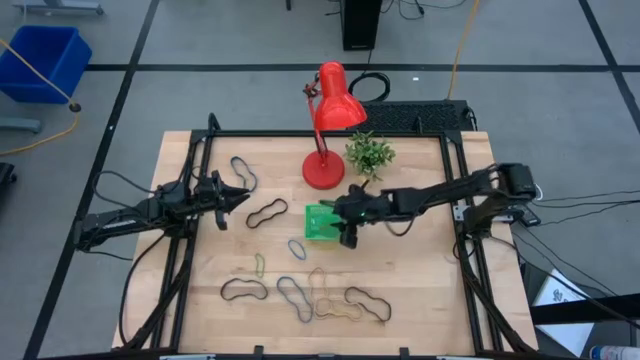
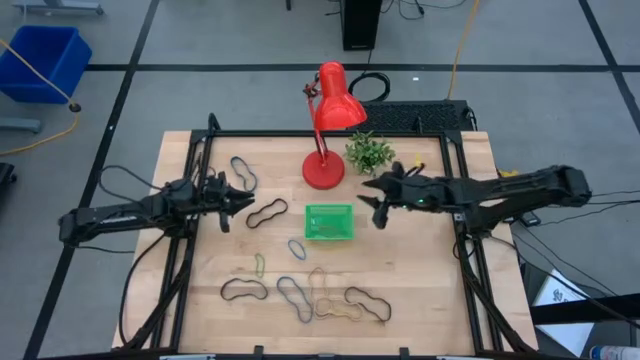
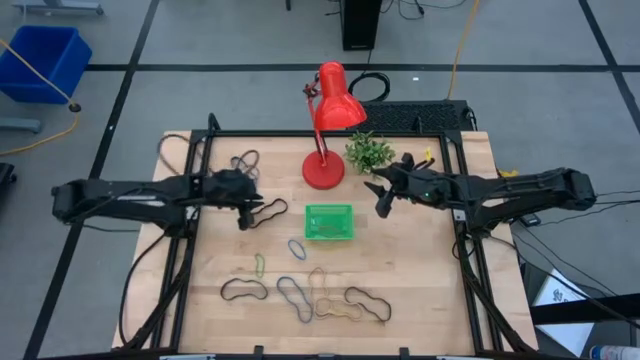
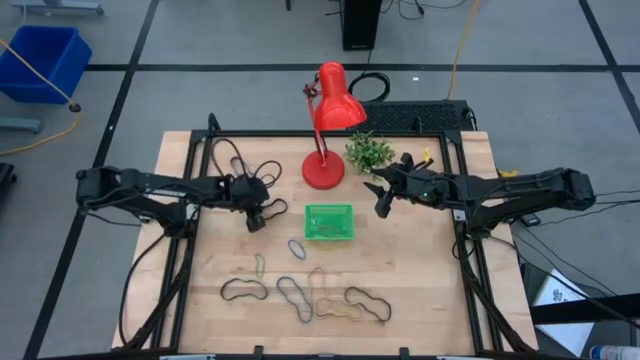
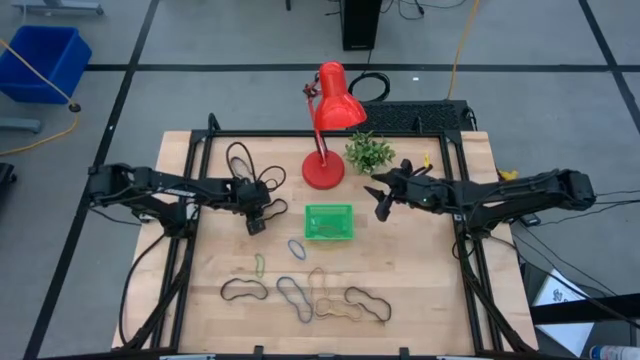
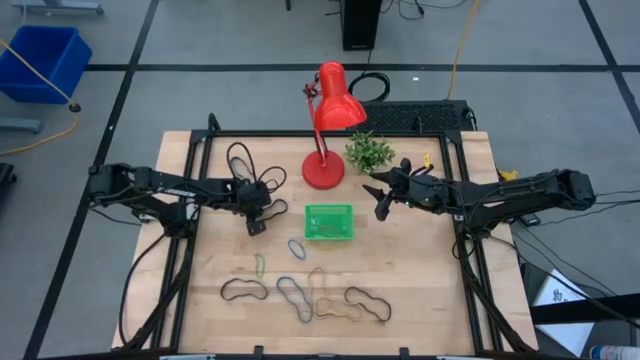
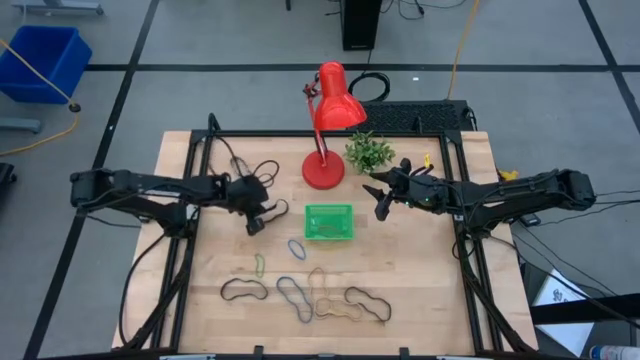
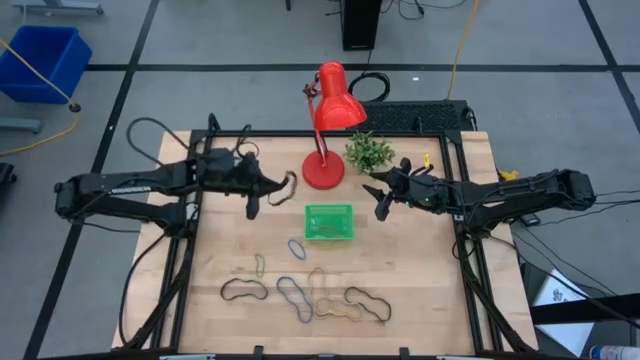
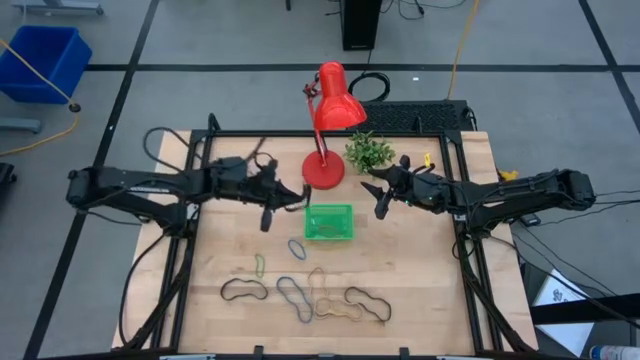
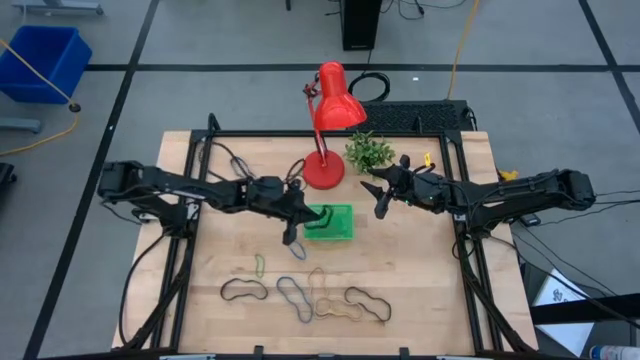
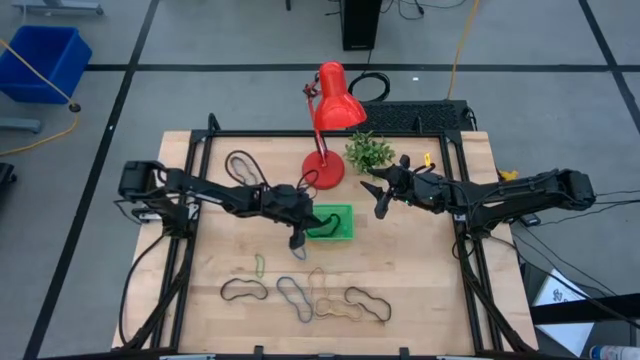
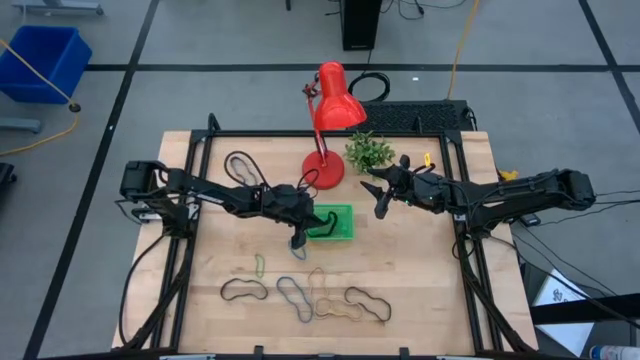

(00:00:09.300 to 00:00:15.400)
Task: Pick and place rubber bands into bin
Put the top left black rubber band into the green bin

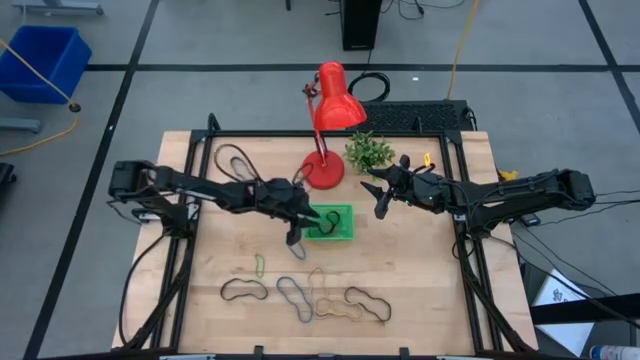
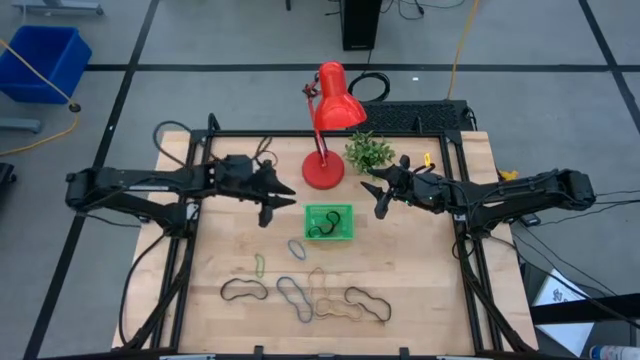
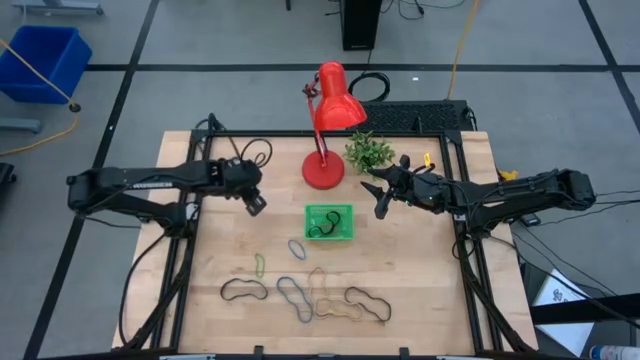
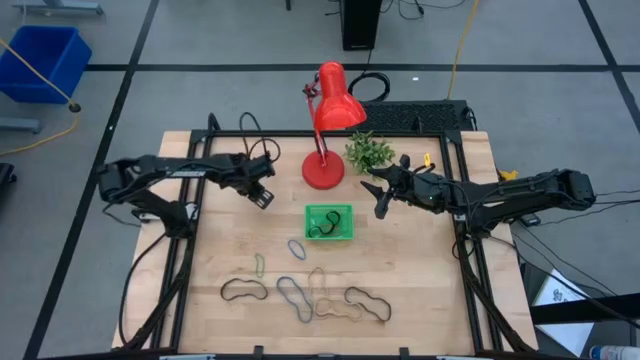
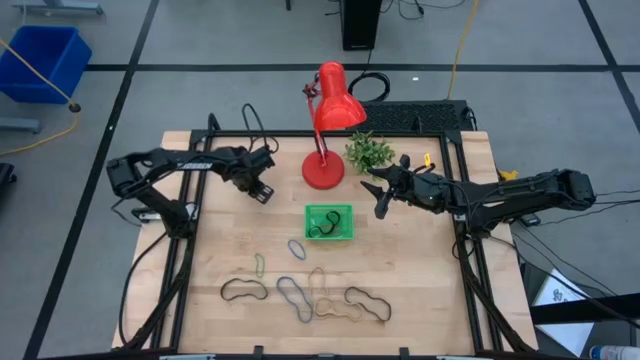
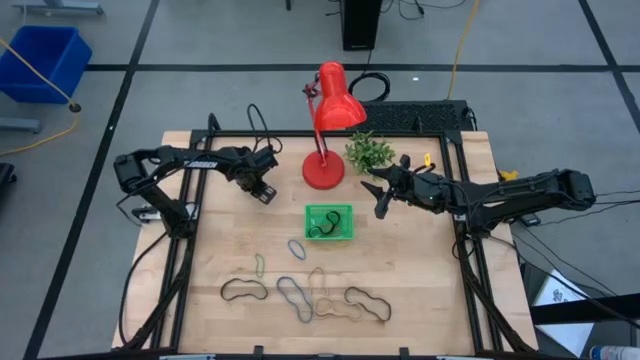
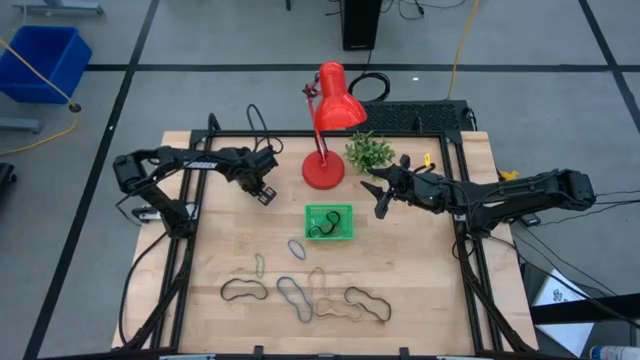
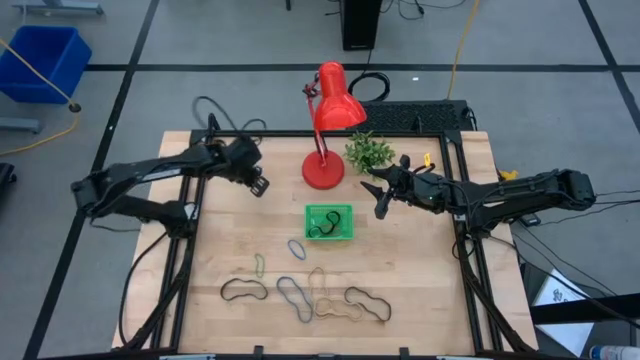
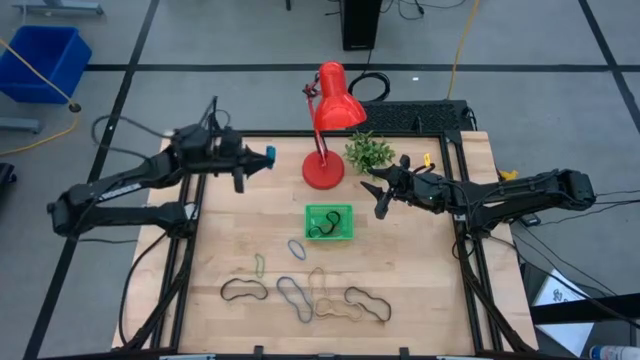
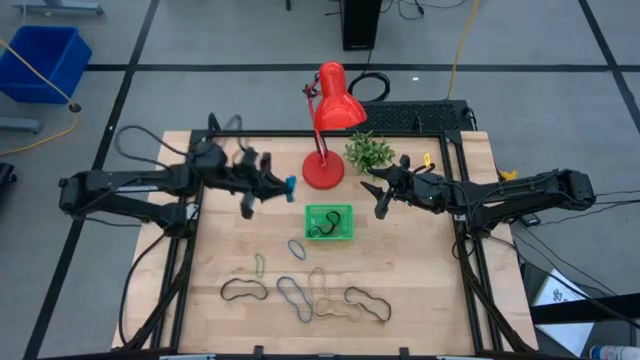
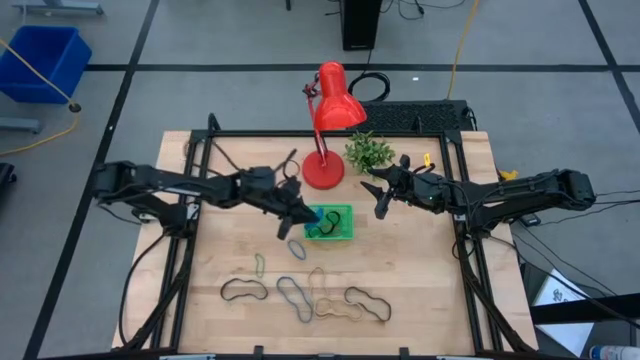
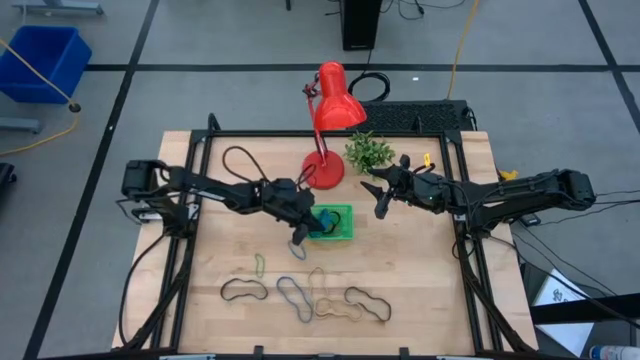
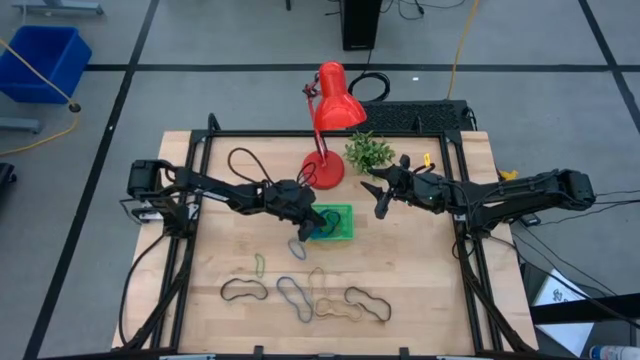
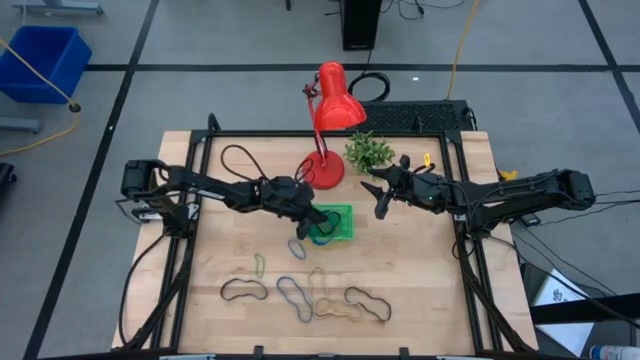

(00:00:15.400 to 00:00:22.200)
Put the top blue rubber band into the green bin

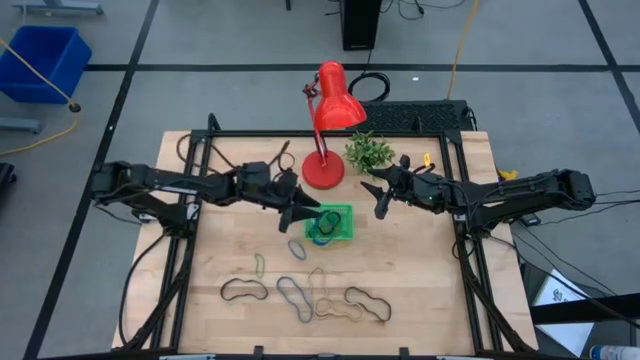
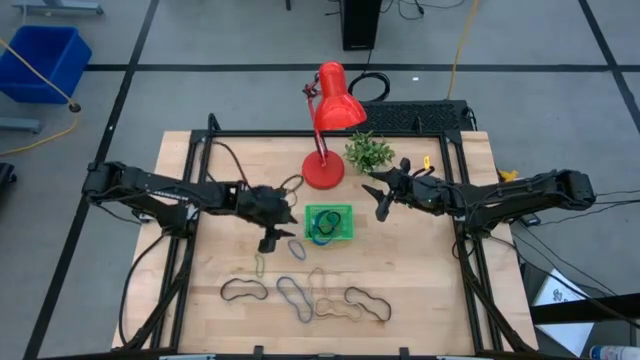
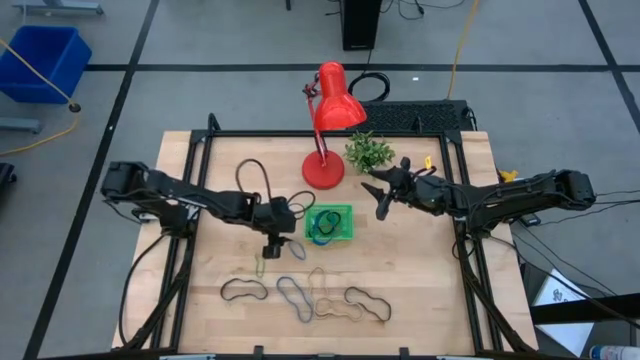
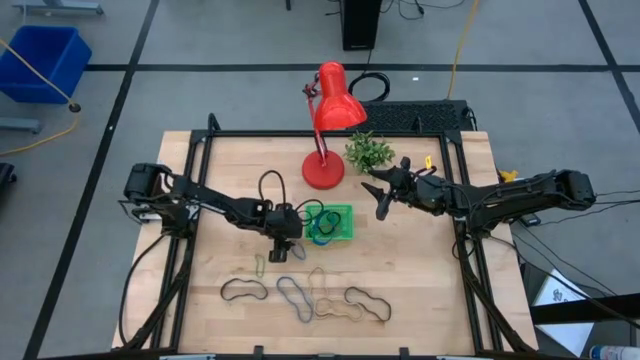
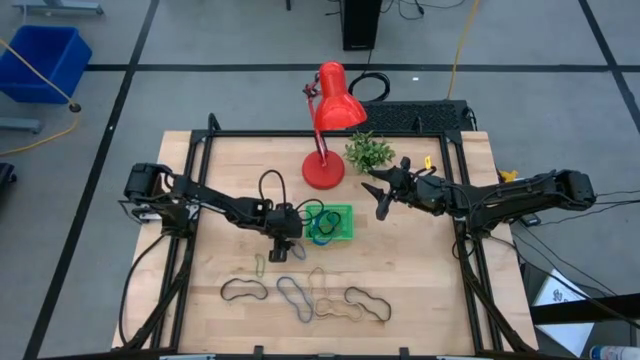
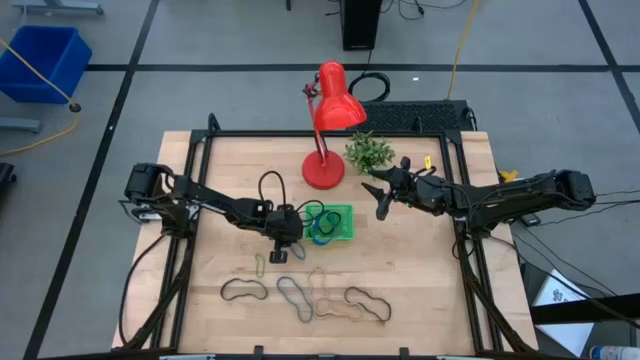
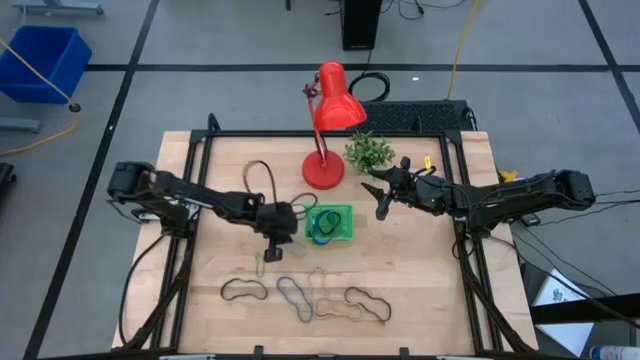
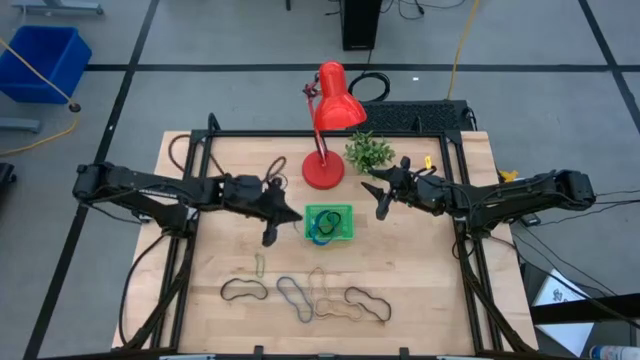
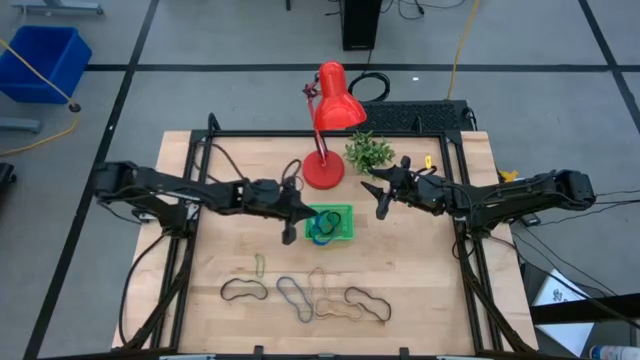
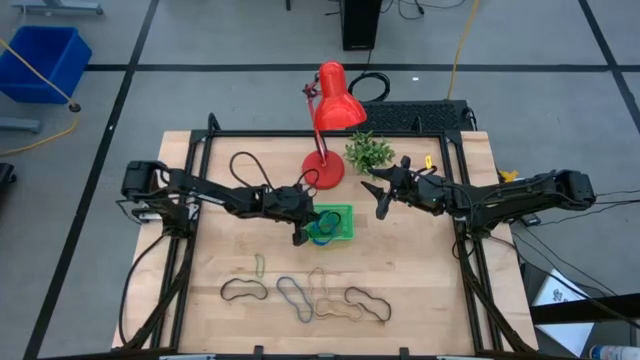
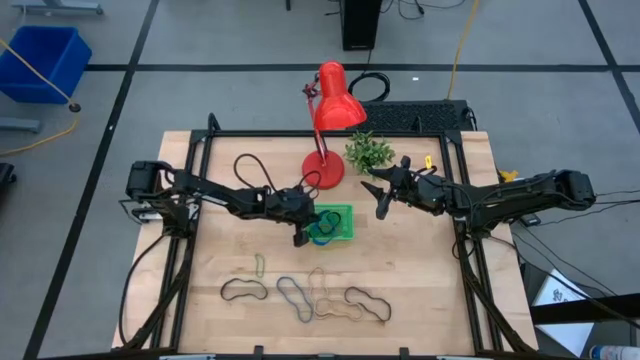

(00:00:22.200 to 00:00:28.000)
Put the top blue rubber band into the green bin

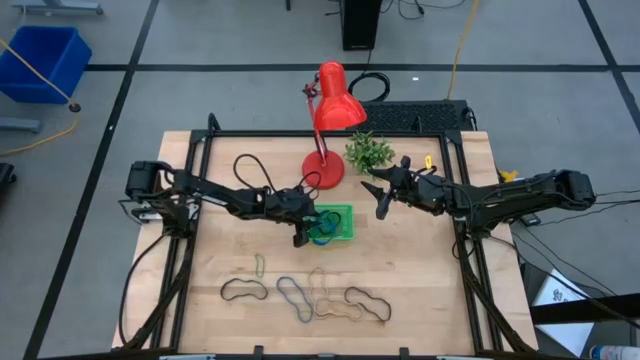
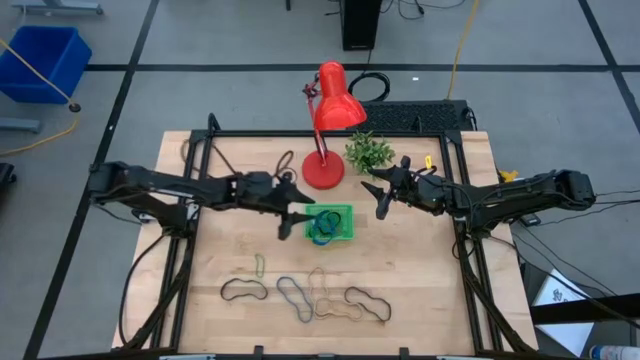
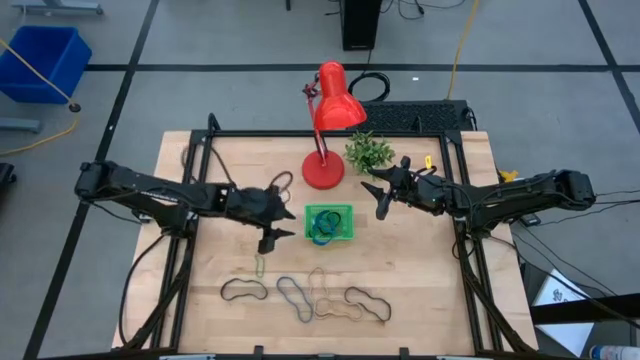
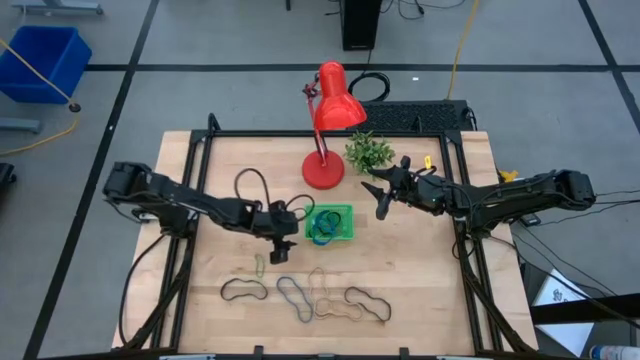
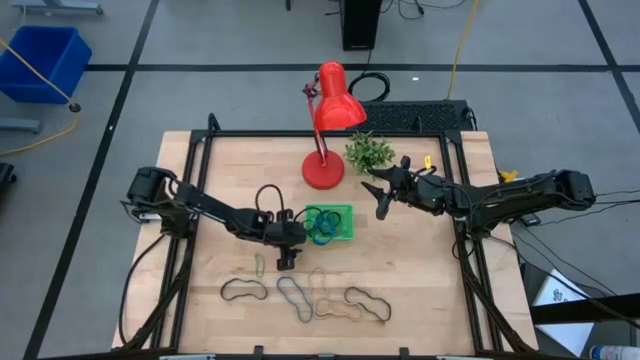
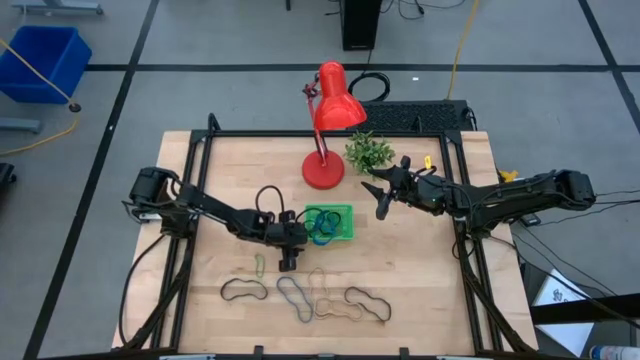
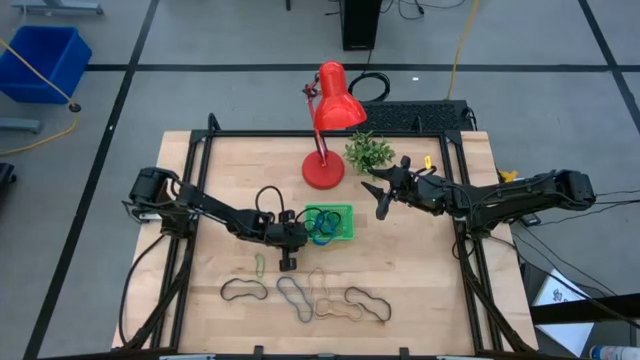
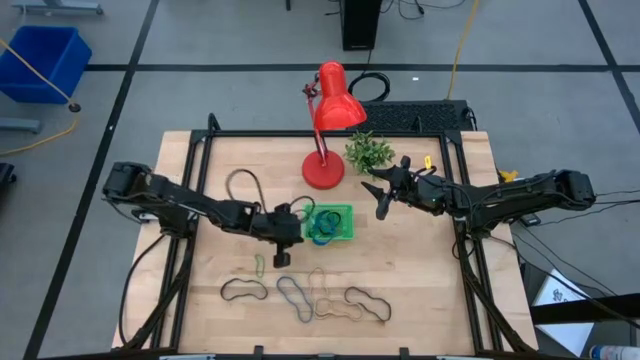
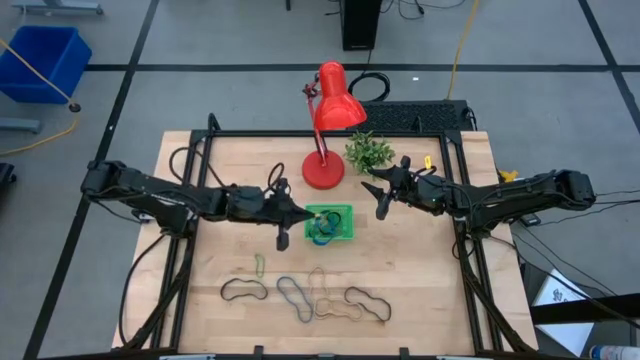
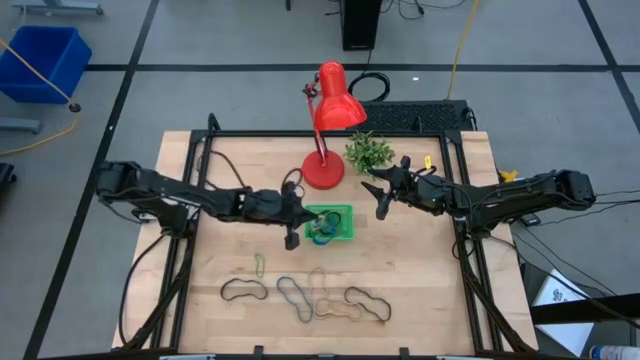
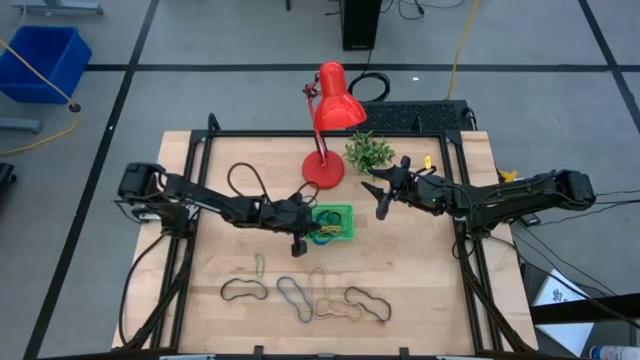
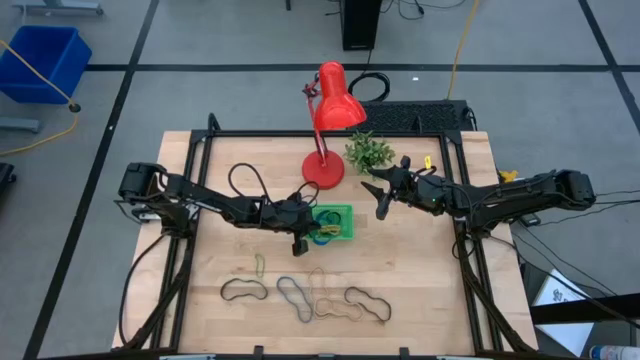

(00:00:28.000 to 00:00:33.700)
Put the yellow rubber band into the green bin
